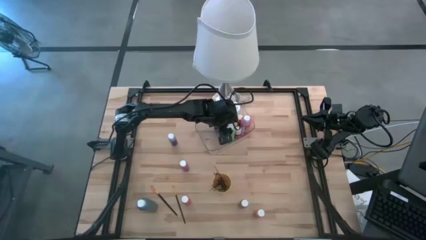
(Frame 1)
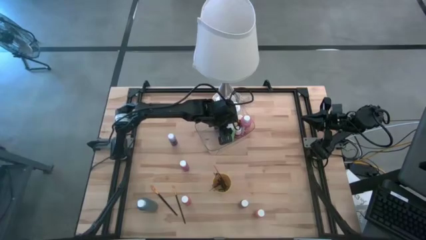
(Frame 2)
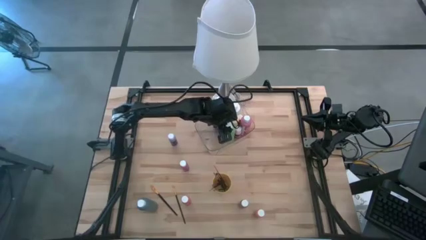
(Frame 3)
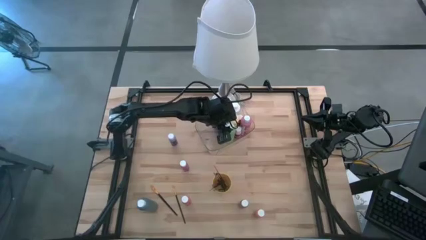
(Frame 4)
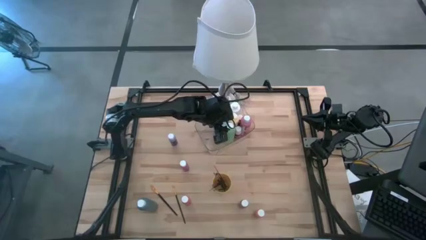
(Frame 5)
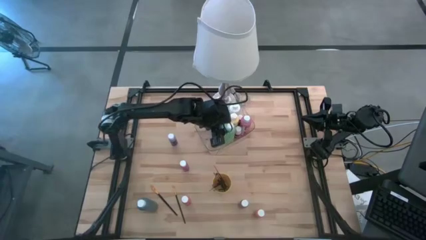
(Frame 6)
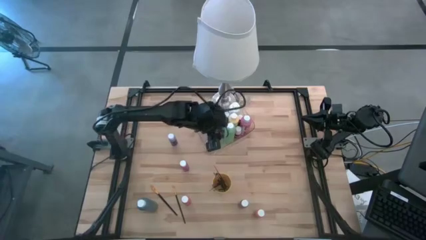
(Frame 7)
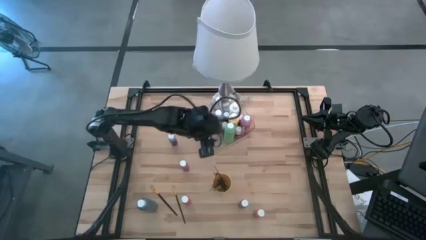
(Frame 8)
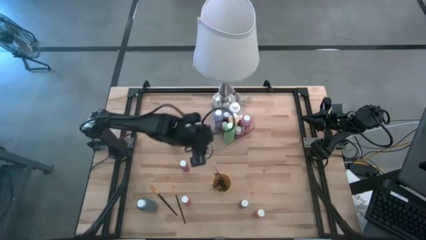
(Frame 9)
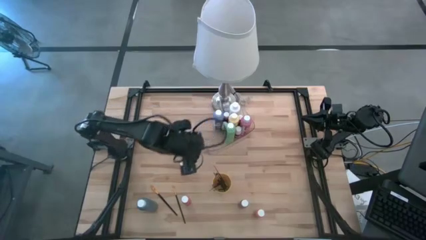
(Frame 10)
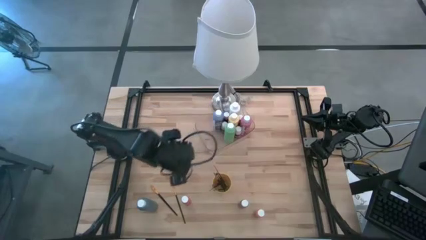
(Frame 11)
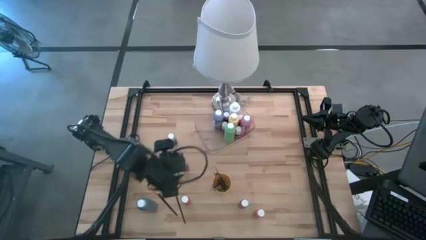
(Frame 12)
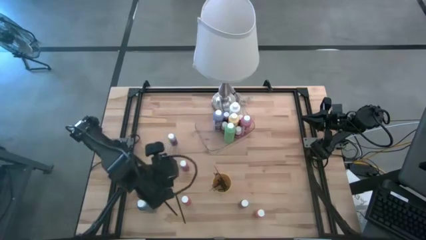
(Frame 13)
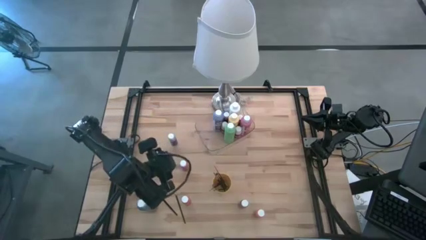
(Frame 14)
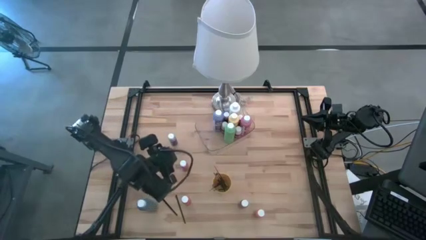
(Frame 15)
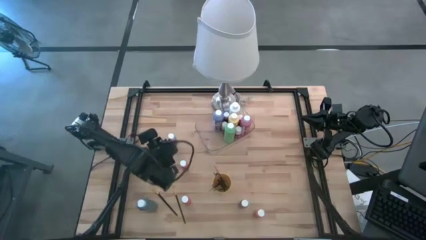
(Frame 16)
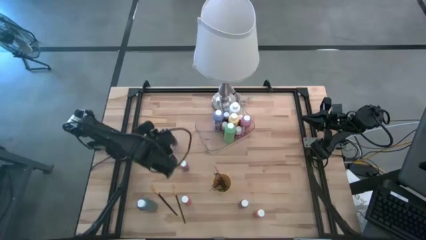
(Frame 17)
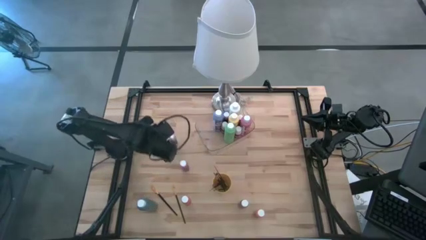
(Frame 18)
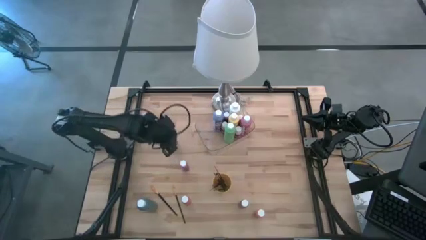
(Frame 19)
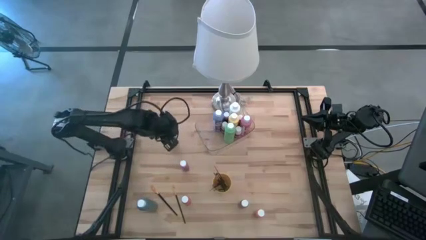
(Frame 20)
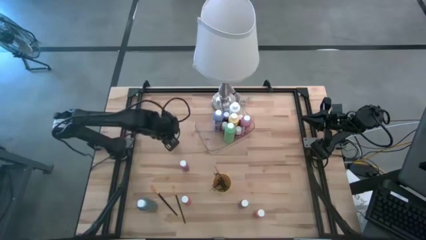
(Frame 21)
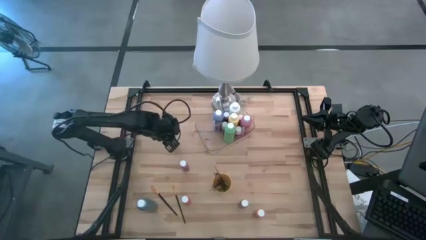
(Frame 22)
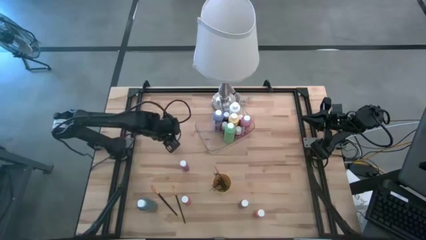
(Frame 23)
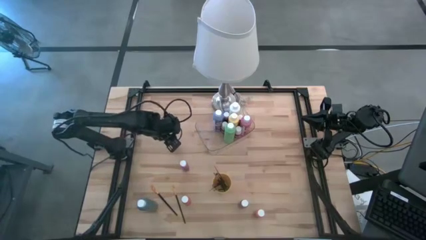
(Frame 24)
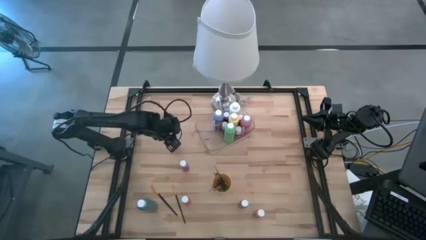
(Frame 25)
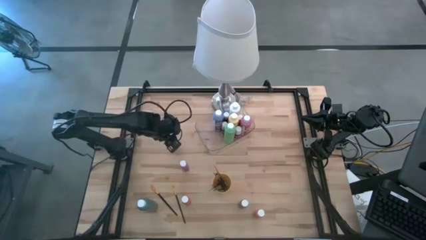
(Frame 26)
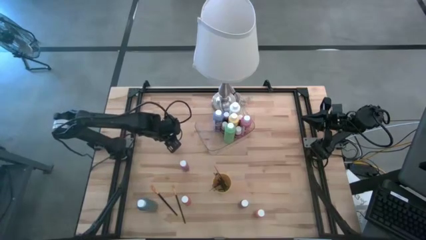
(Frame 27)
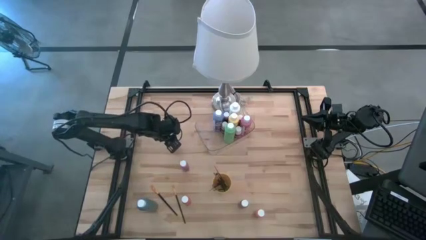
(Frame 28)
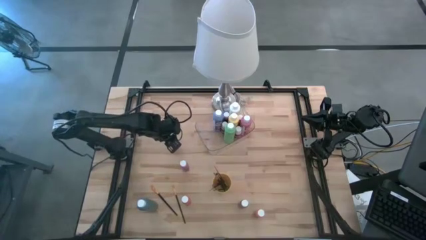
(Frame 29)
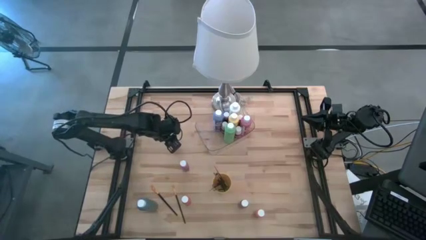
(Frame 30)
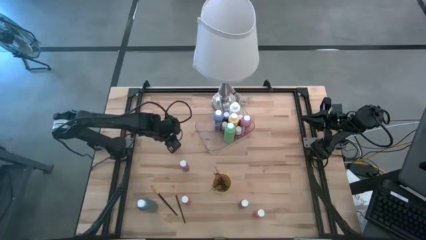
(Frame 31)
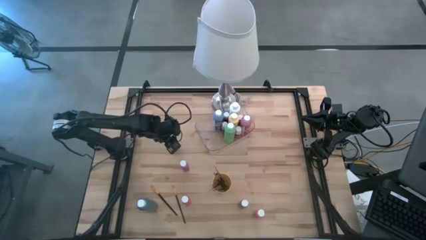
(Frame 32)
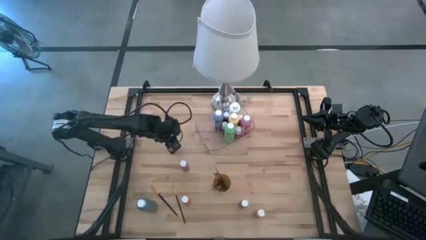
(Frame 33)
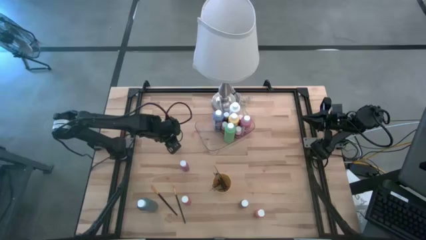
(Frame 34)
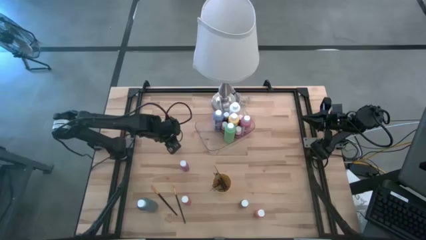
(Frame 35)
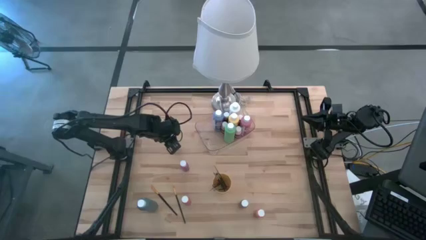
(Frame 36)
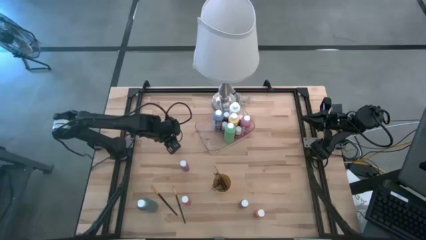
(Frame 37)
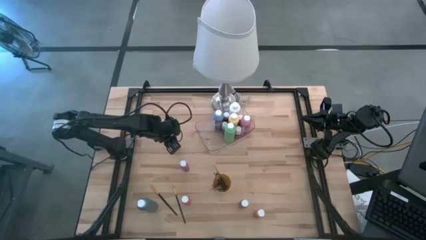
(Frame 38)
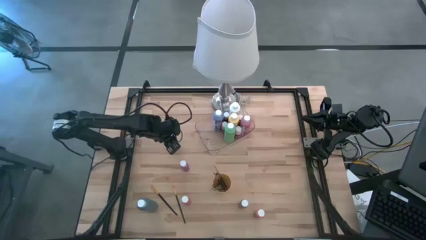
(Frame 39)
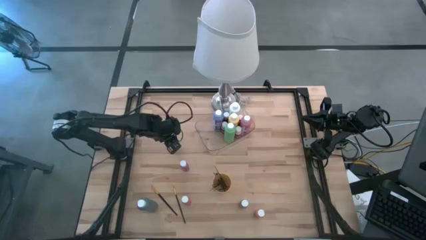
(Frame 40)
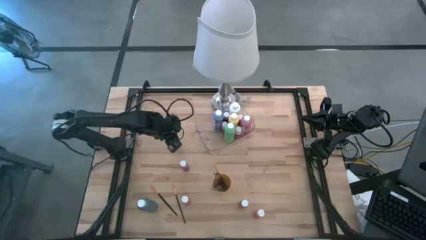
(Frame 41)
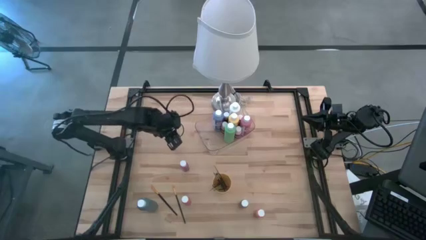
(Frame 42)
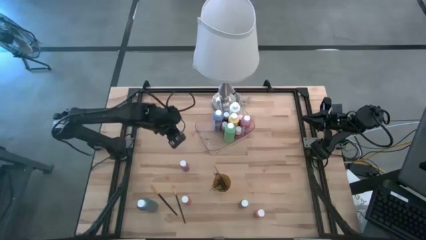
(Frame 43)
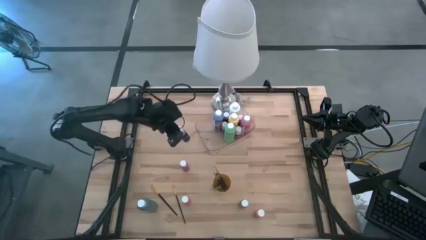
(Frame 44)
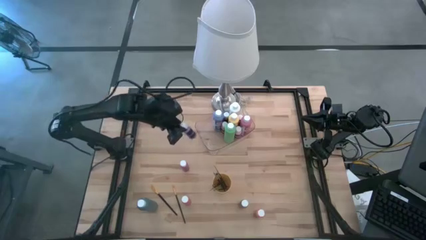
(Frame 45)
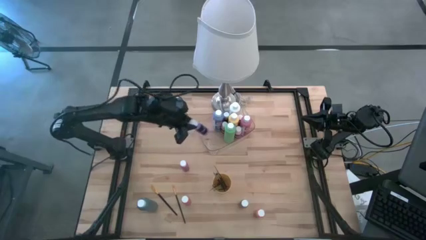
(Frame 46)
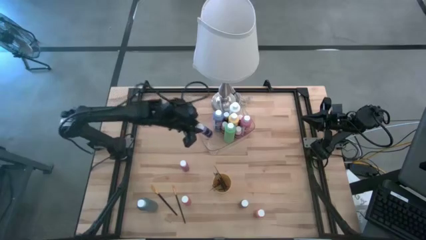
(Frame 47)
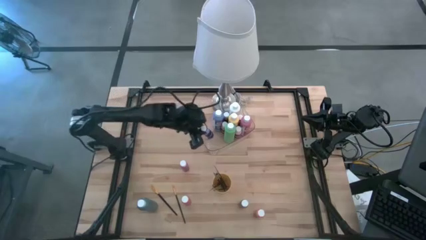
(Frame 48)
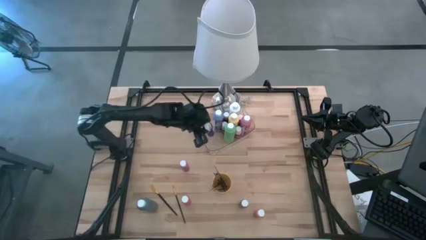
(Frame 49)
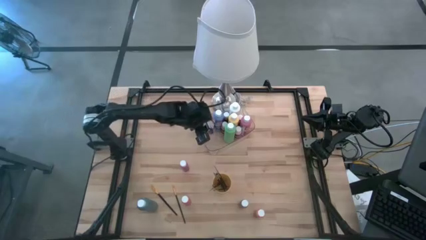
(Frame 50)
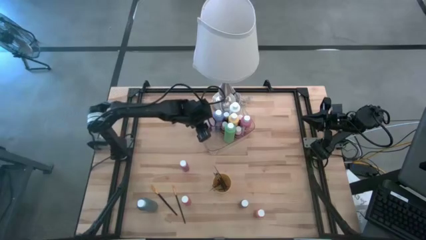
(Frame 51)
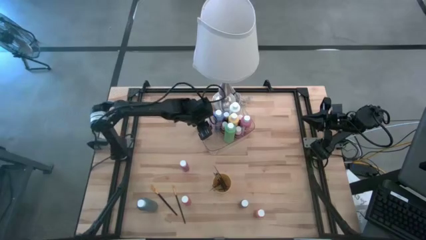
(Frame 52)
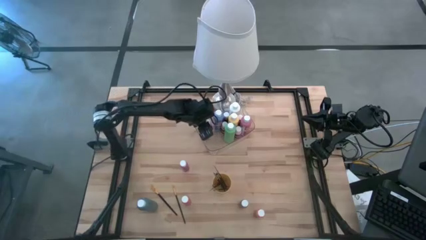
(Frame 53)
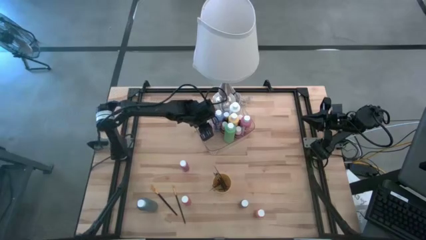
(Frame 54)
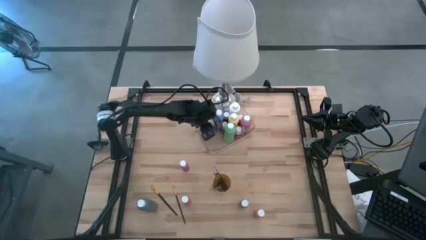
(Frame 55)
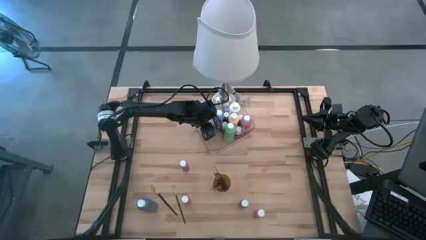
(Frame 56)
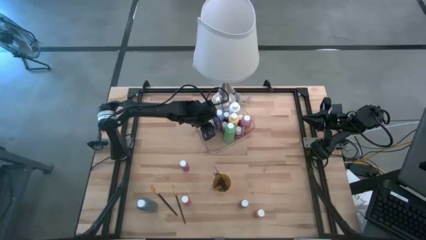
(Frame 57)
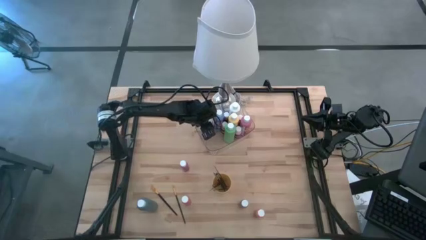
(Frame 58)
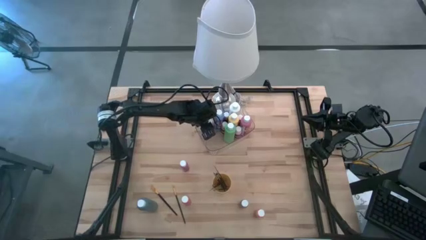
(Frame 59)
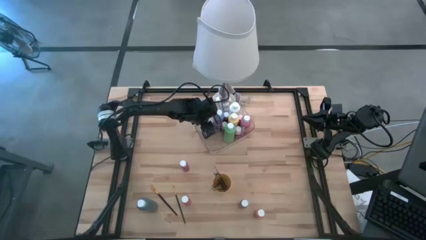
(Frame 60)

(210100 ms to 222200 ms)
Task: Pick & Place Paint Supplies
Put the purple bottle into the transparent bin

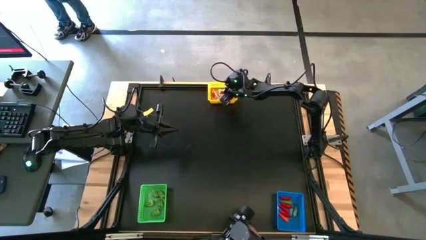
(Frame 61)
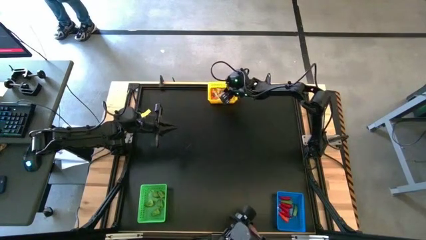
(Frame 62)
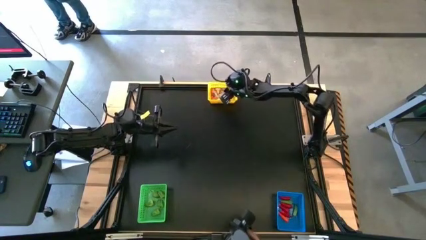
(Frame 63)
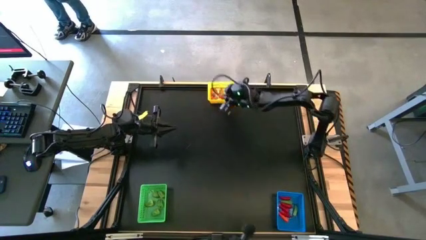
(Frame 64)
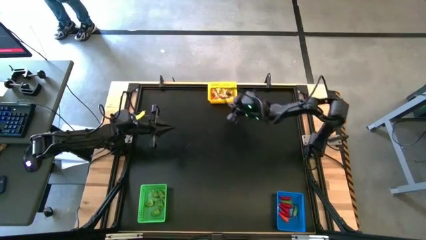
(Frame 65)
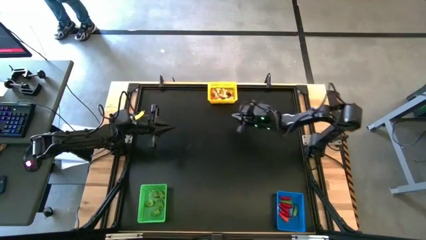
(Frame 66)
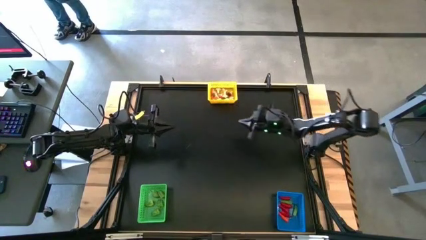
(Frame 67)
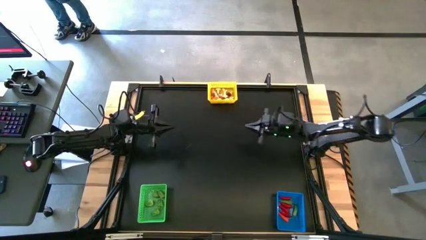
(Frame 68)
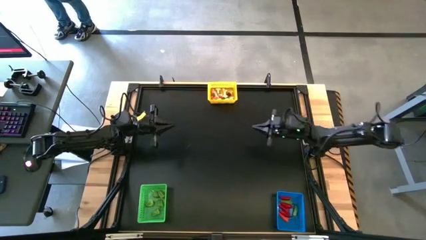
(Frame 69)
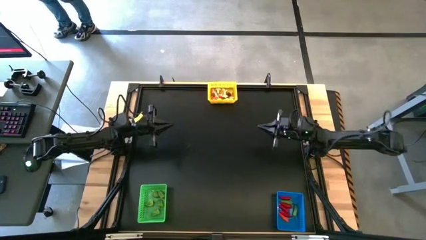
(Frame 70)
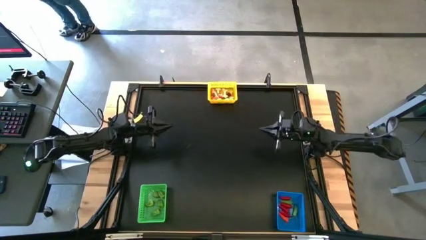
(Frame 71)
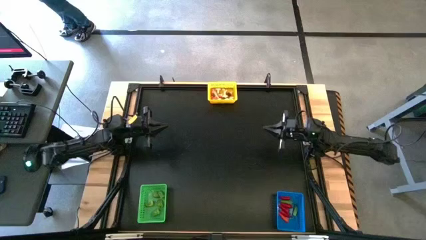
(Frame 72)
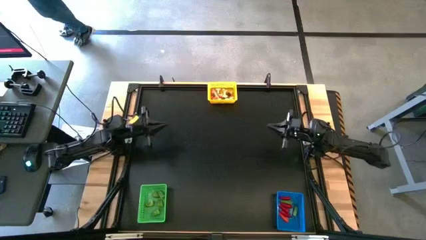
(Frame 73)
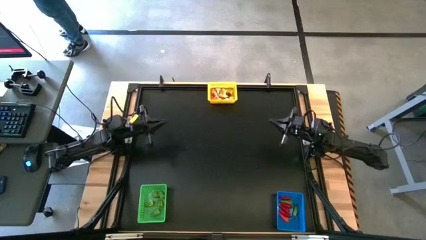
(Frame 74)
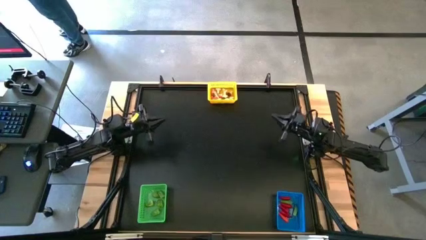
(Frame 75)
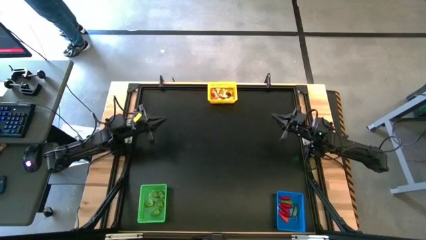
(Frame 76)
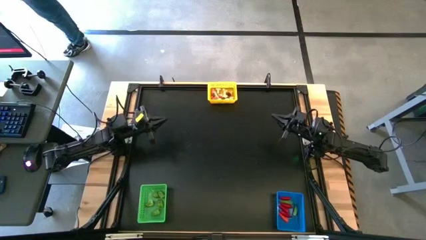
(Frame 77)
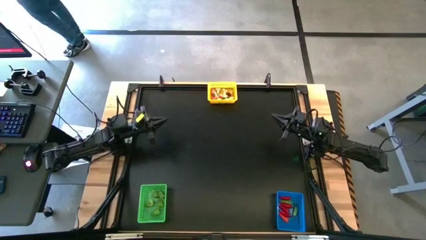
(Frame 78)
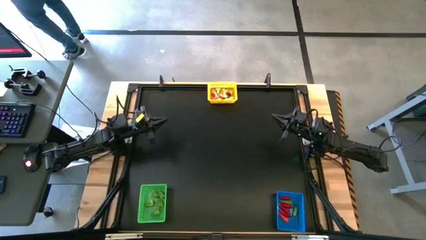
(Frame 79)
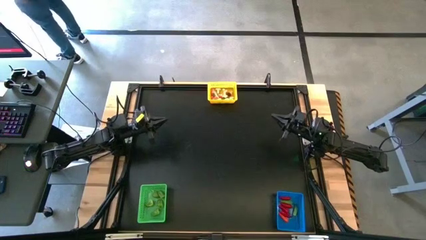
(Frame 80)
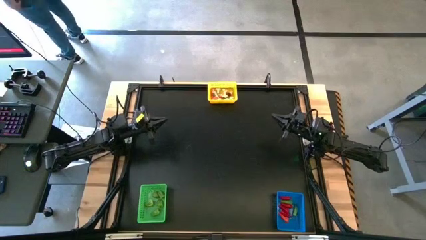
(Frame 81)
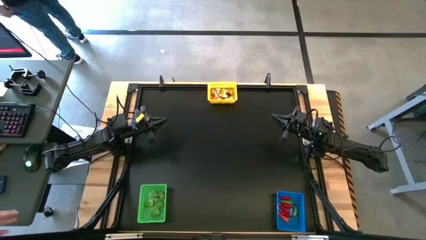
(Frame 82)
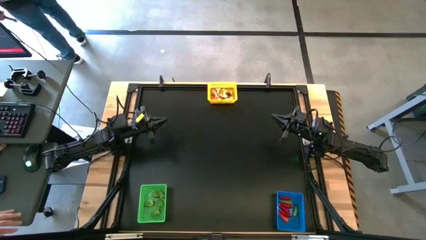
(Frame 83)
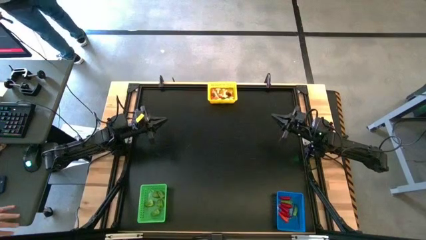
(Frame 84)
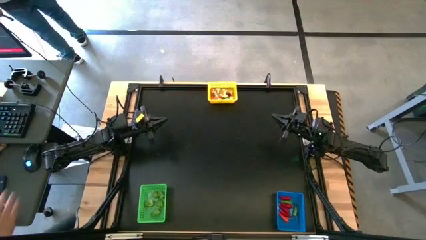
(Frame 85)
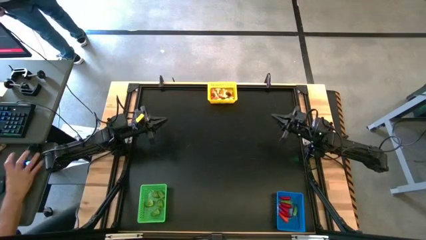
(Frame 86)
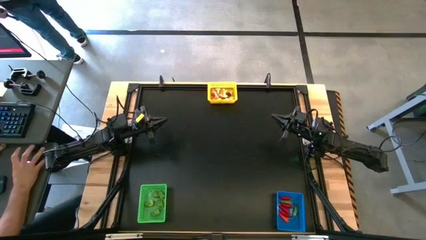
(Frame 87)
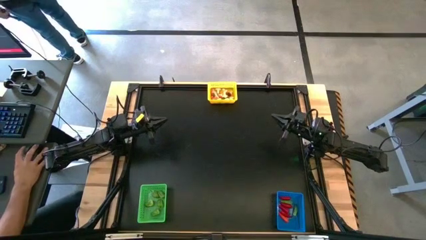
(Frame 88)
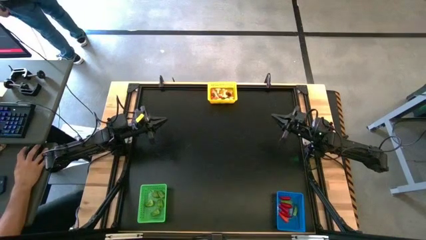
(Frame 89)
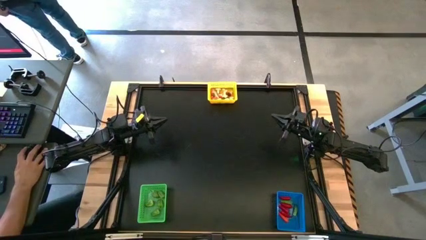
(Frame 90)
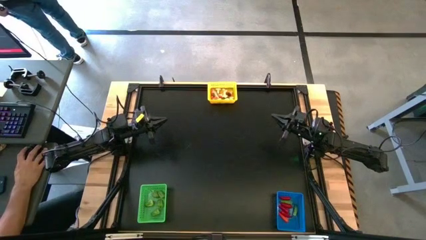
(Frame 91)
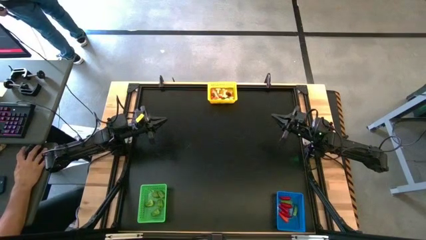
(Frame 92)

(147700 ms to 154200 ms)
Task: Sort produce into baskets
Return to Home Position
